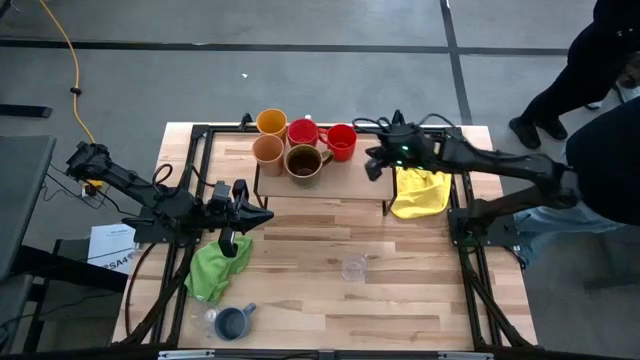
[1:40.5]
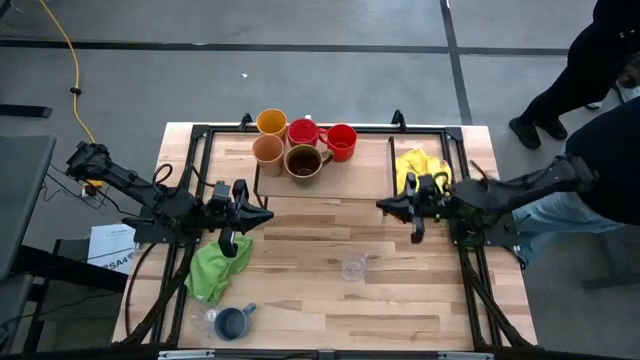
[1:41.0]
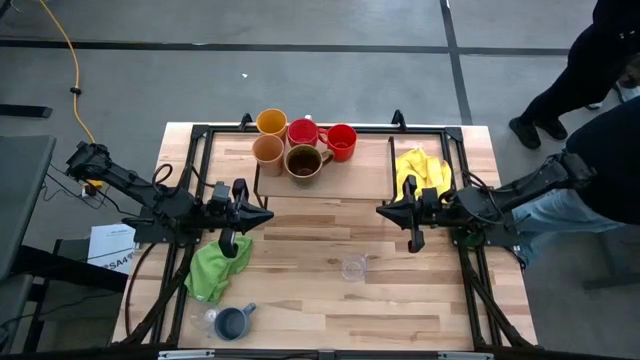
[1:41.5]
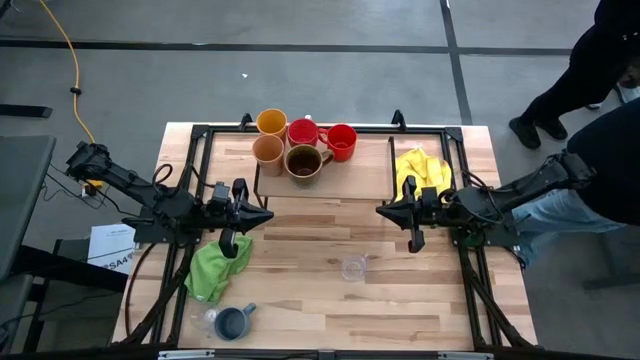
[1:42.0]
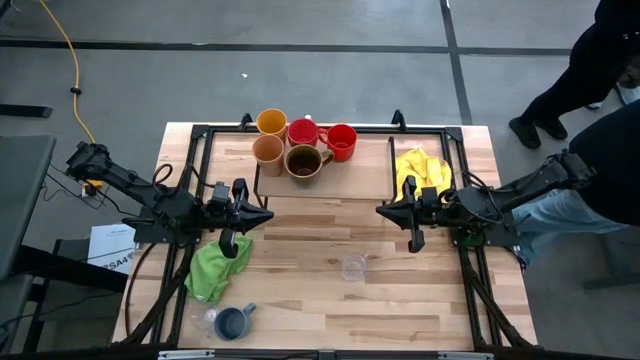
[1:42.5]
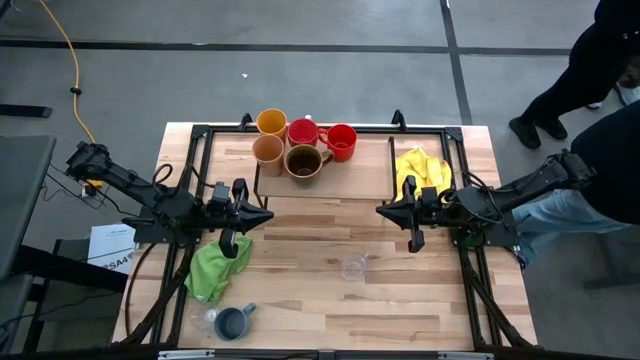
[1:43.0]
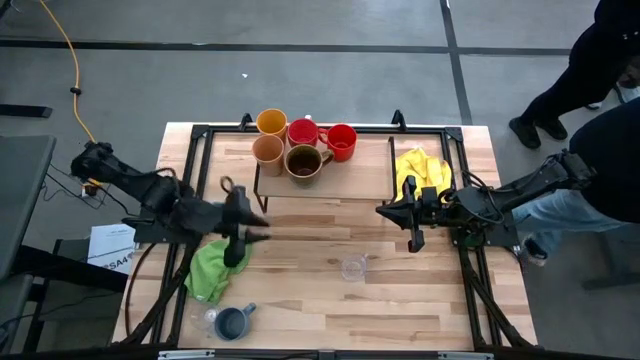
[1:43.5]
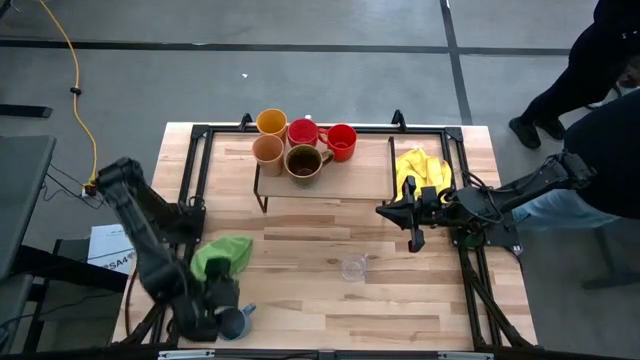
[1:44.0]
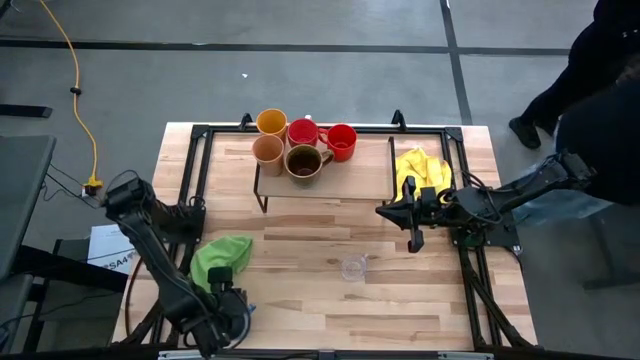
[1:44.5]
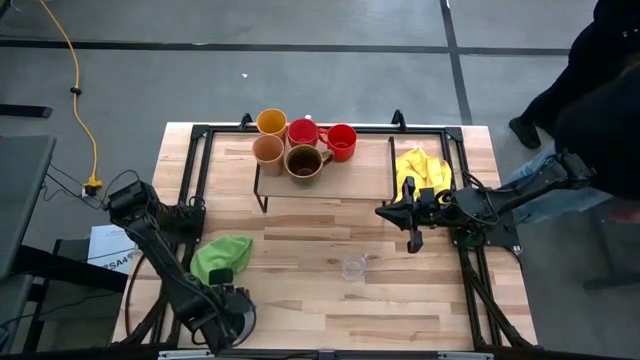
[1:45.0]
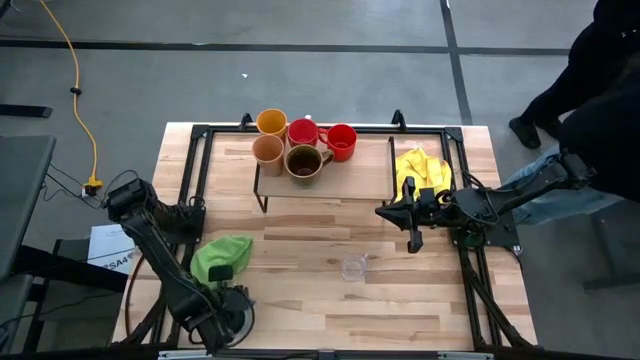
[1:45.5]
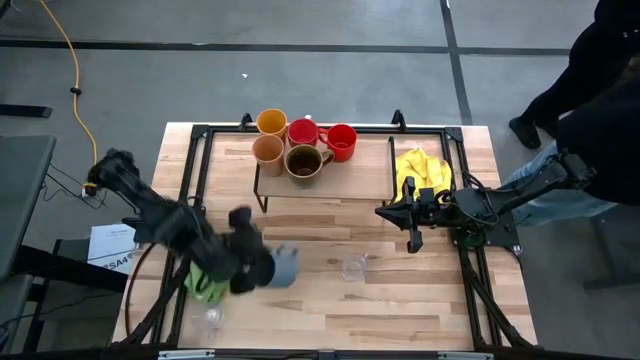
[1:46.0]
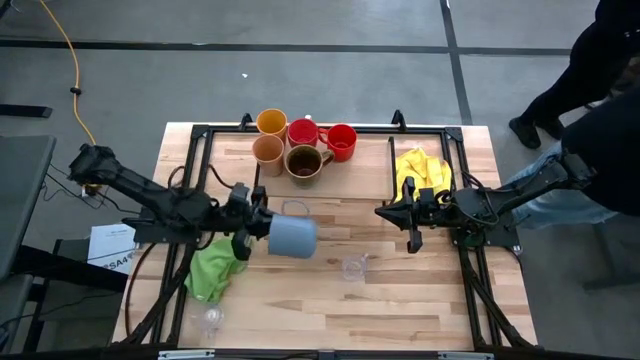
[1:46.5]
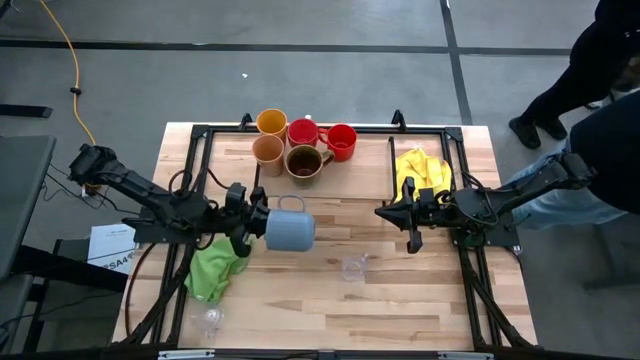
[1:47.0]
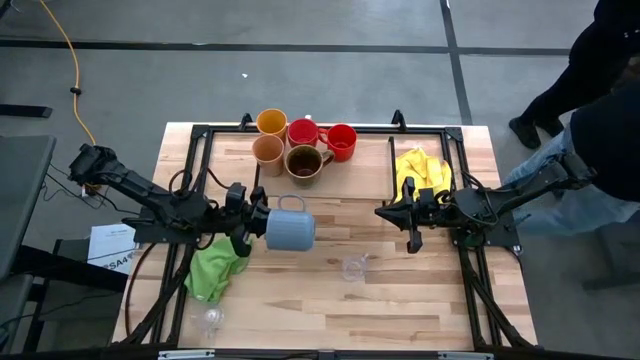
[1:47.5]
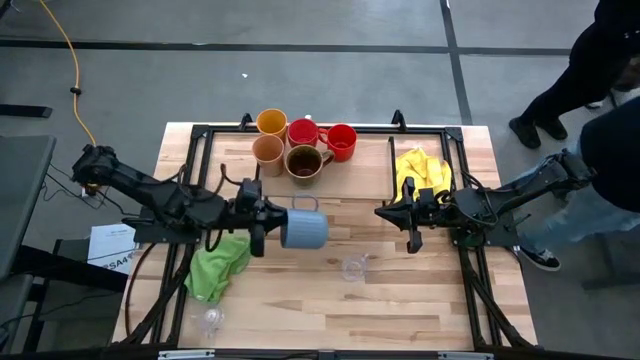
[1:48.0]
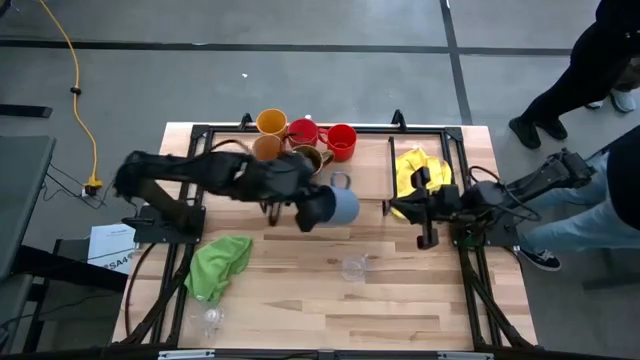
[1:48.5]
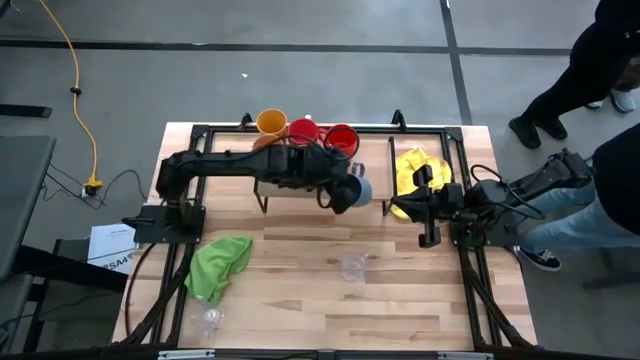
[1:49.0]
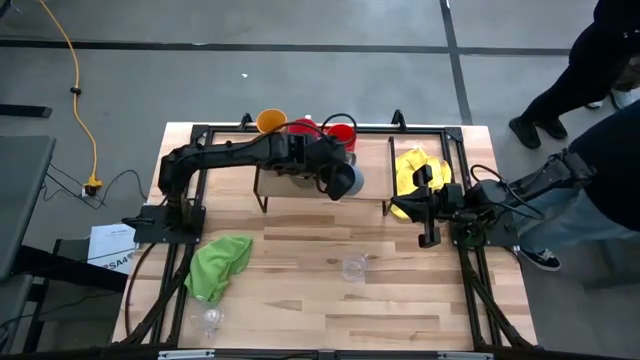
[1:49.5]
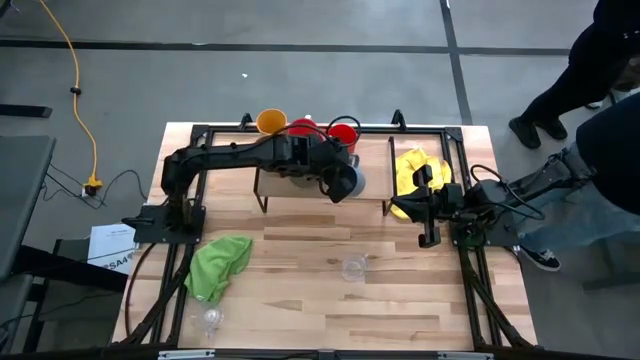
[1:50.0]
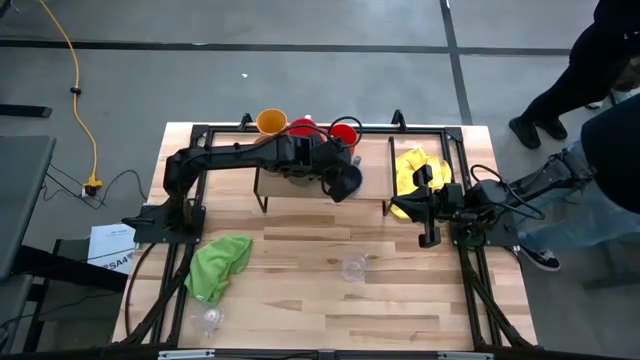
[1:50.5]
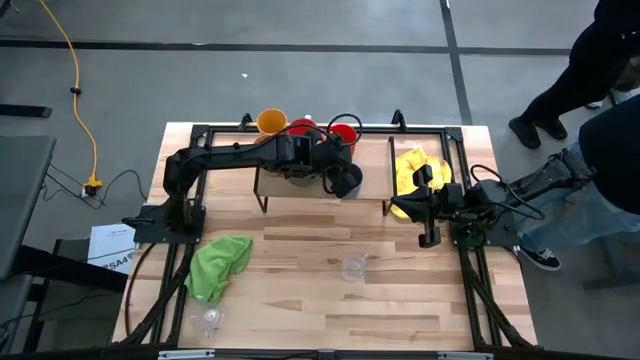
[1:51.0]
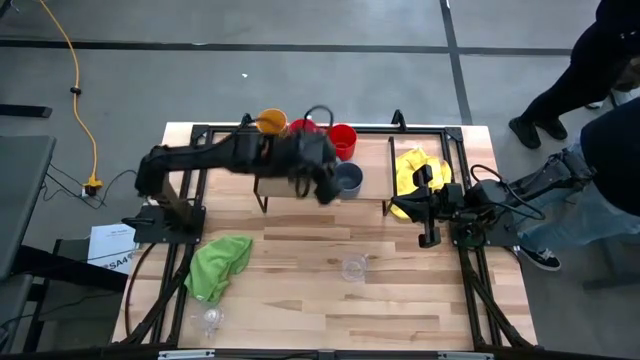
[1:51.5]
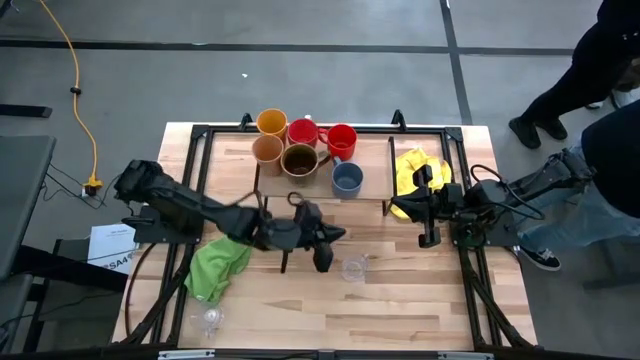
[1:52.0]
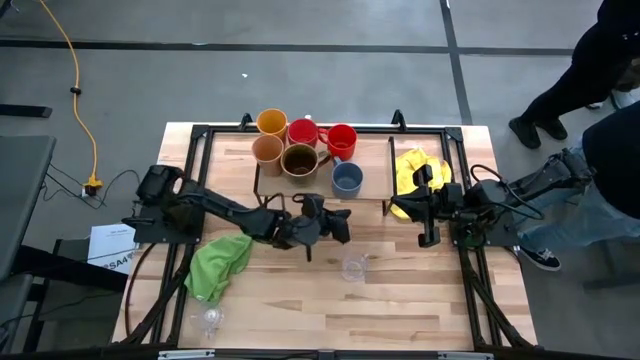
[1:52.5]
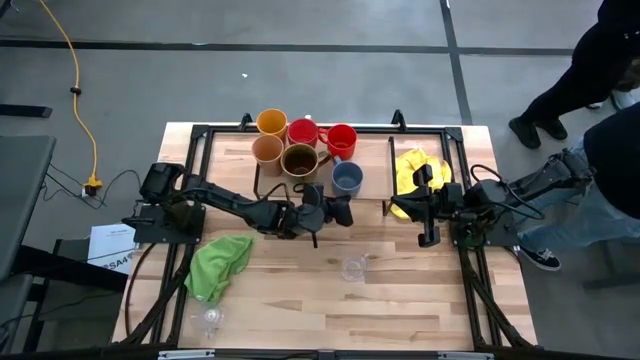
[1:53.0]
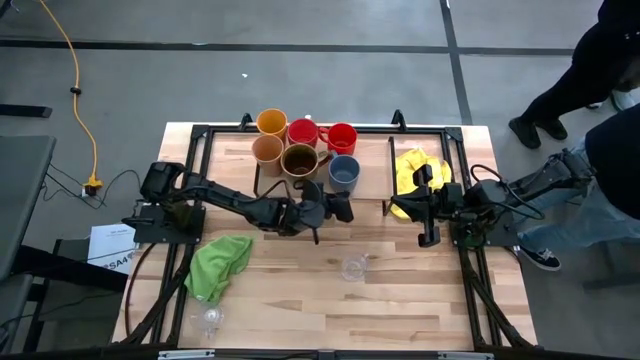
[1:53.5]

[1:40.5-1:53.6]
Task: Stack small to large cups/mugs on shelf
Put the blue mug on the shelf

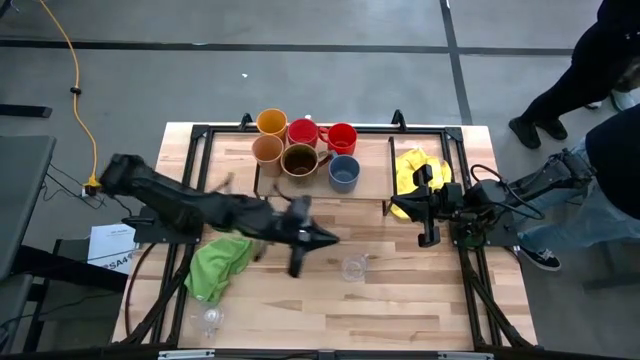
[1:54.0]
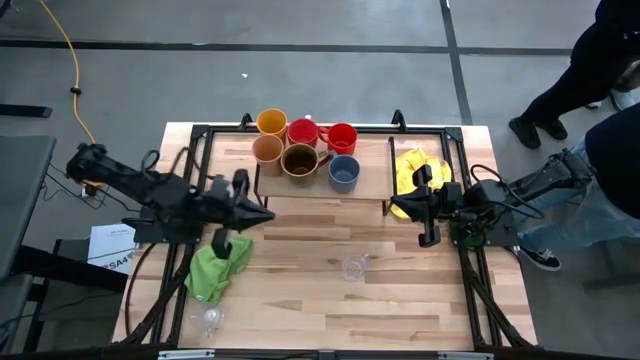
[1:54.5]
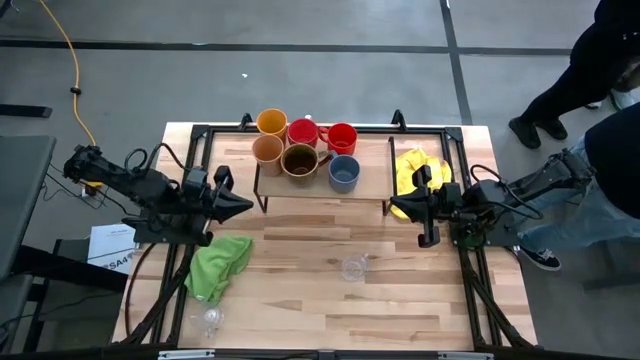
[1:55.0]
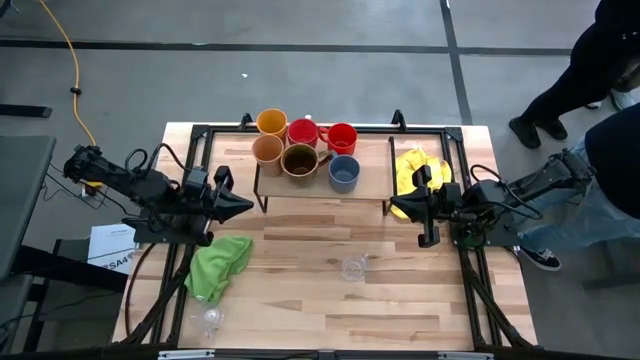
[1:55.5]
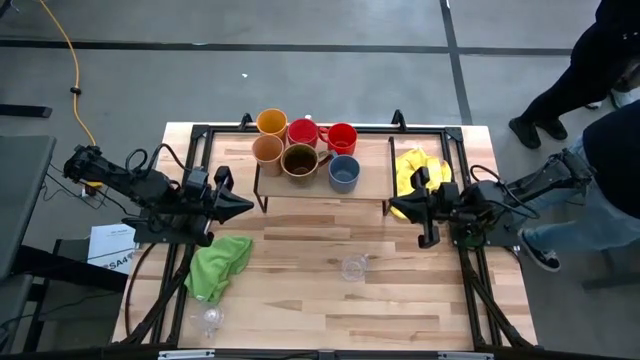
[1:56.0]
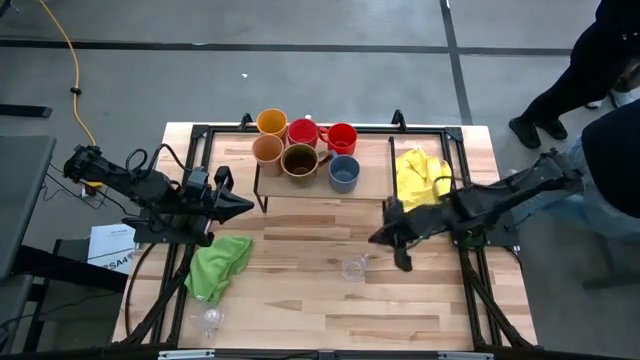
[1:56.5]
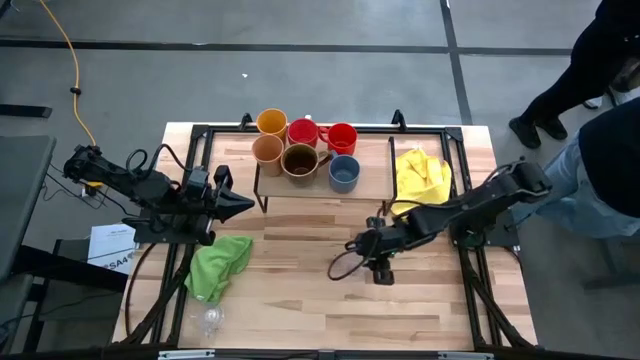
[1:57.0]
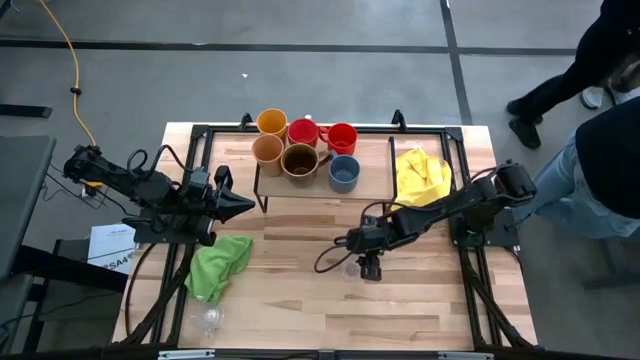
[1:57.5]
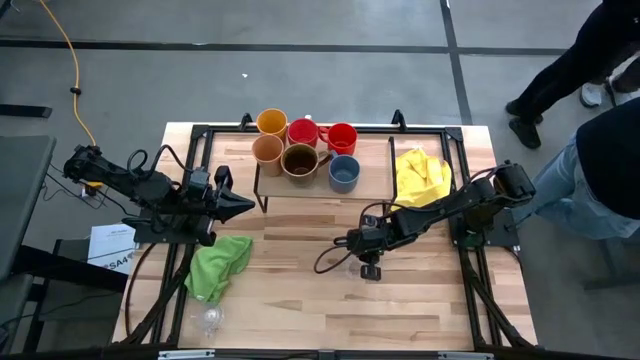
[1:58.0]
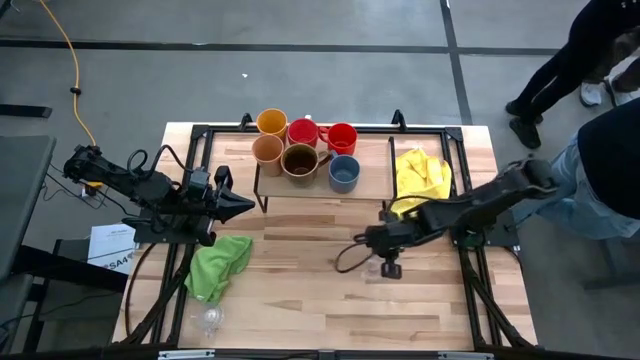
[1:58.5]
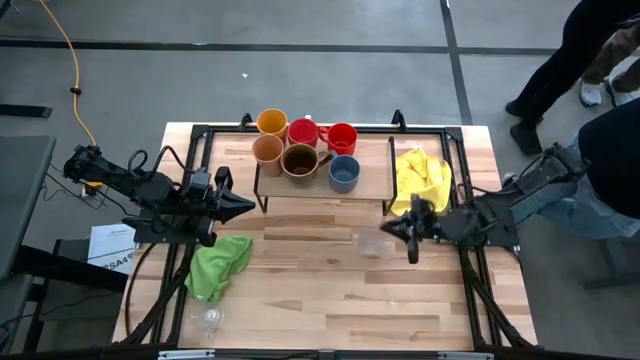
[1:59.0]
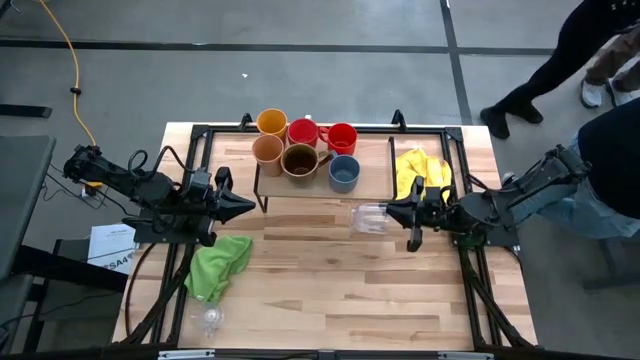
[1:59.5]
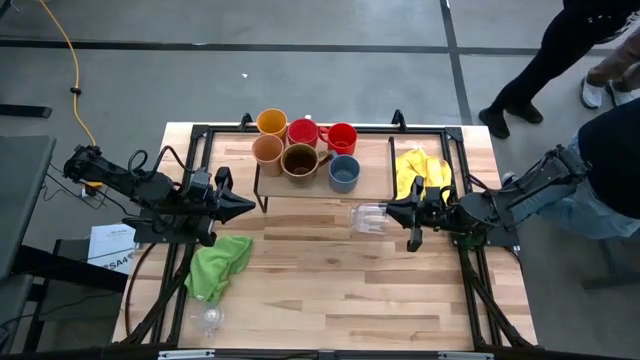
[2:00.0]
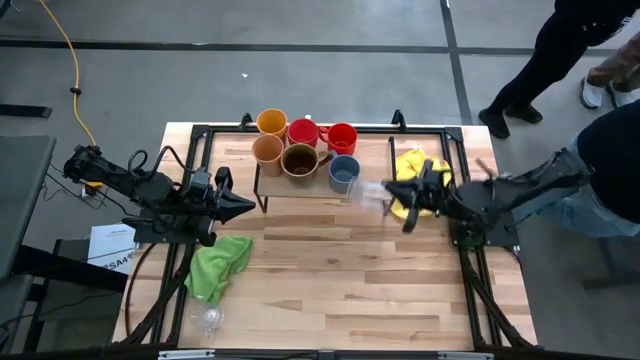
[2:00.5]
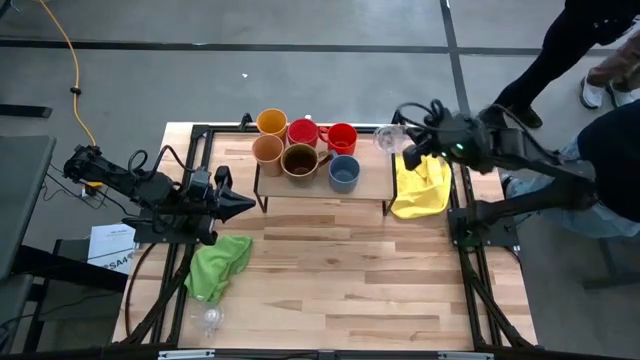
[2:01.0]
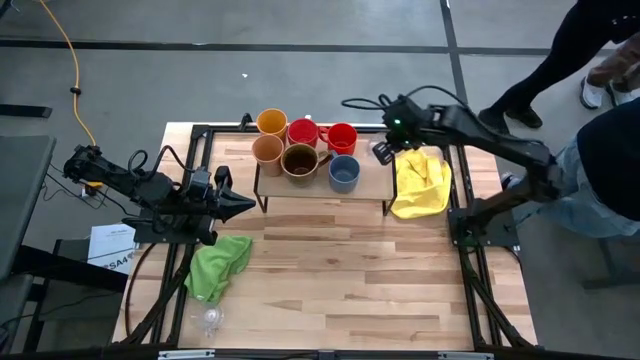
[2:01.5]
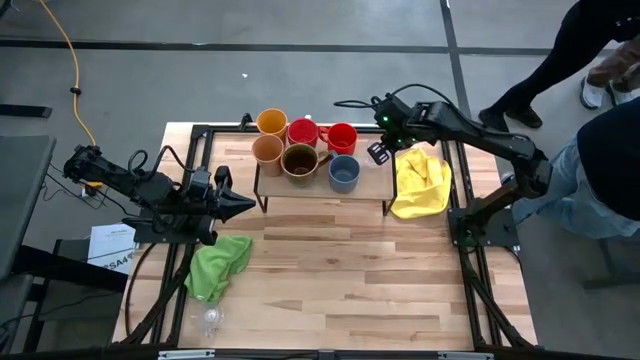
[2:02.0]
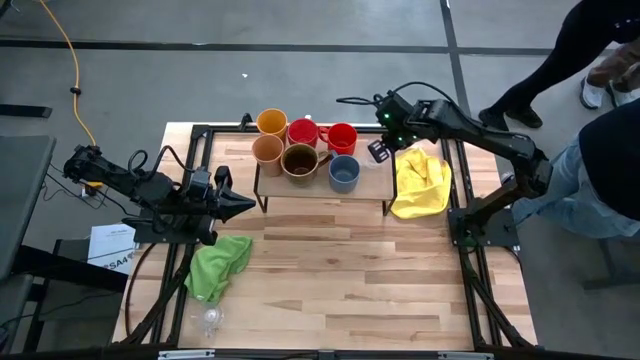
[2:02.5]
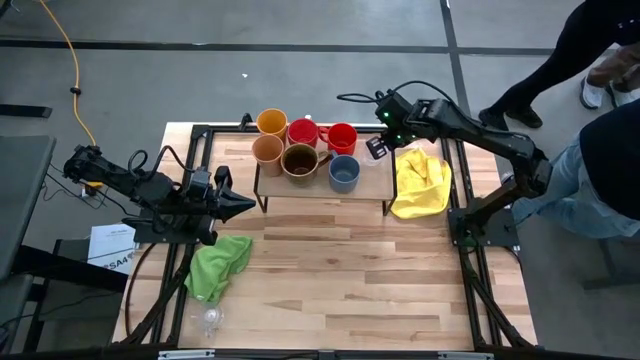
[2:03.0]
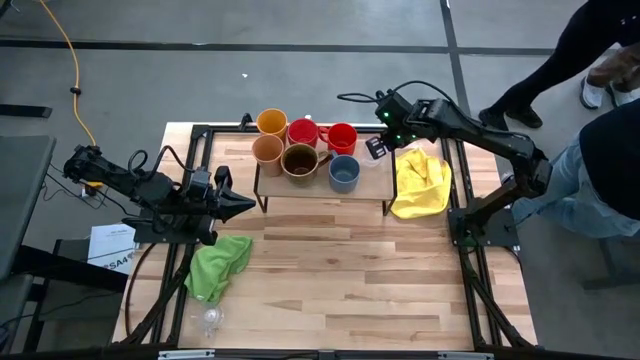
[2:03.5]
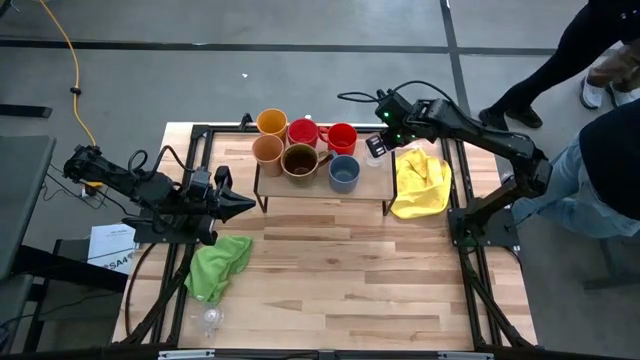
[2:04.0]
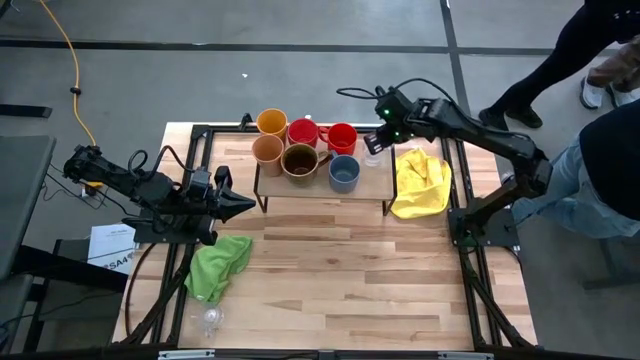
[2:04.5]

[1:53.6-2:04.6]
Put the top transparent mug on the shelf
